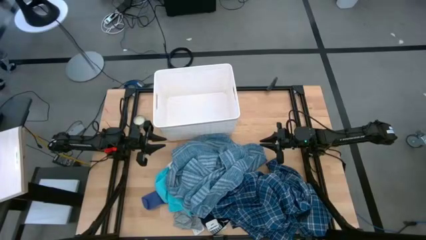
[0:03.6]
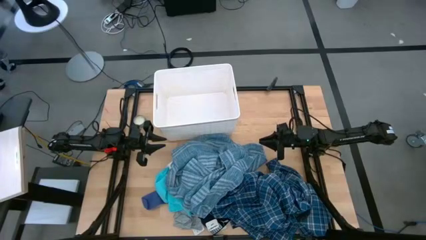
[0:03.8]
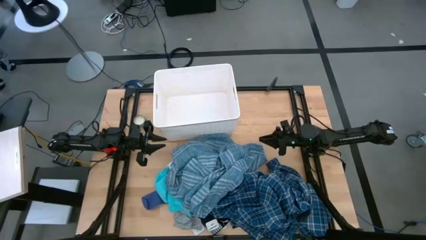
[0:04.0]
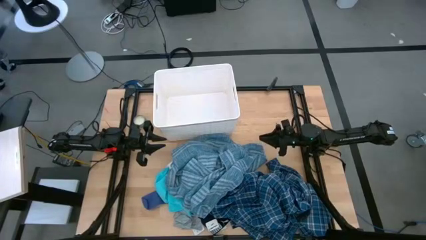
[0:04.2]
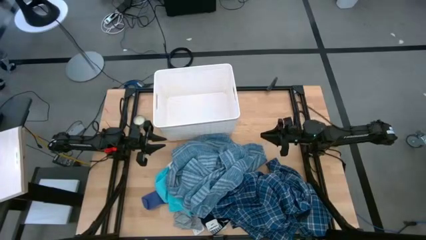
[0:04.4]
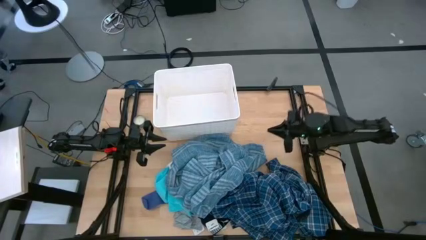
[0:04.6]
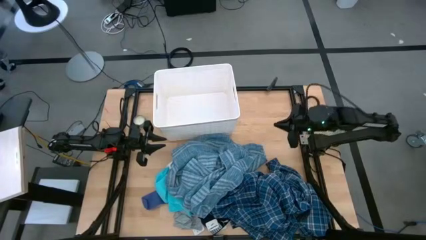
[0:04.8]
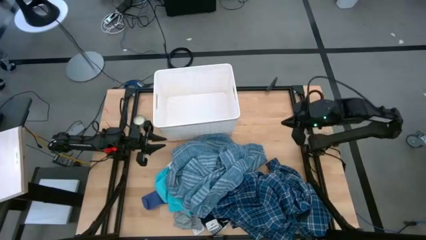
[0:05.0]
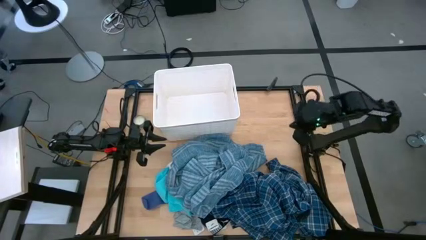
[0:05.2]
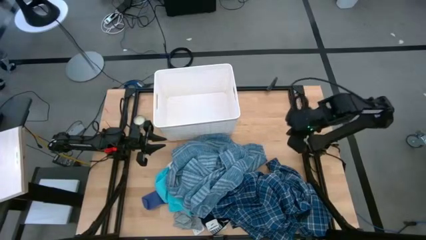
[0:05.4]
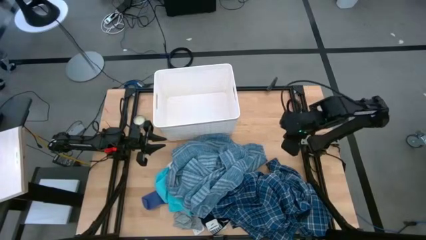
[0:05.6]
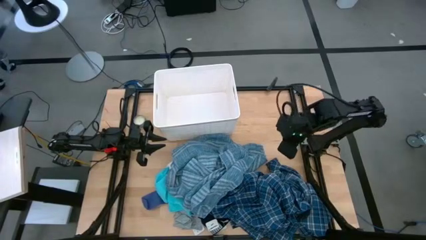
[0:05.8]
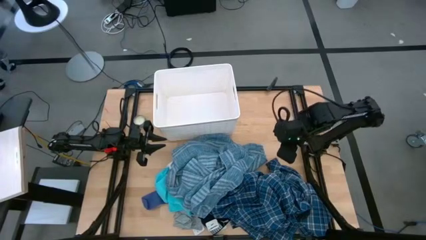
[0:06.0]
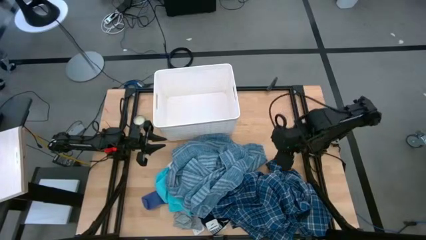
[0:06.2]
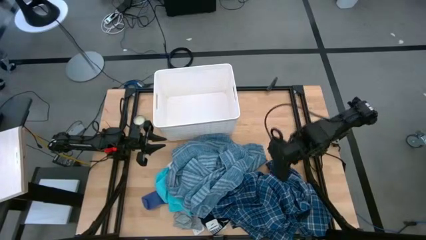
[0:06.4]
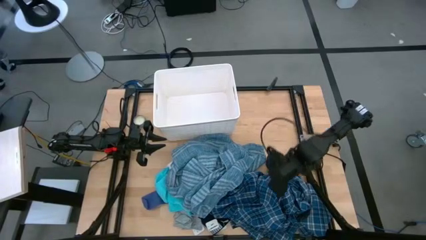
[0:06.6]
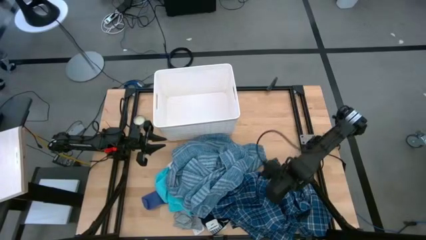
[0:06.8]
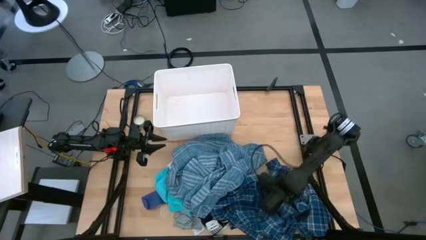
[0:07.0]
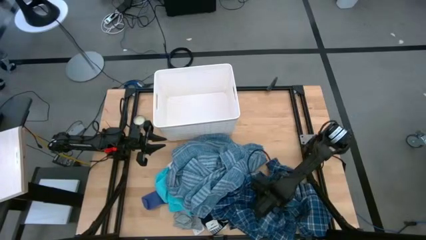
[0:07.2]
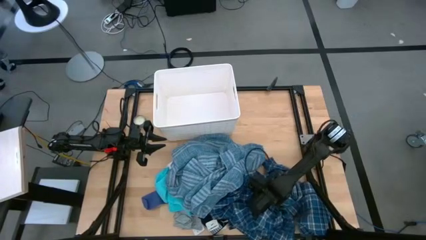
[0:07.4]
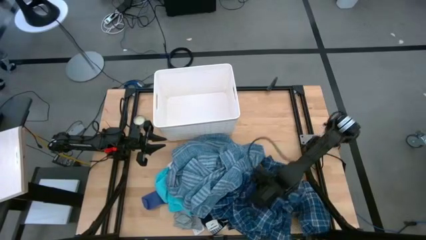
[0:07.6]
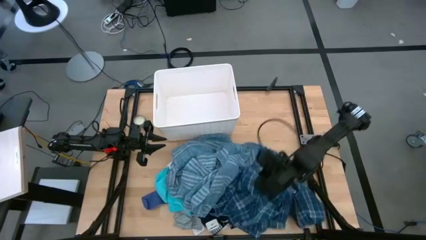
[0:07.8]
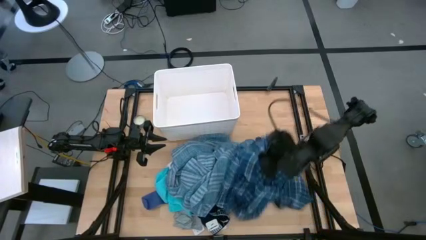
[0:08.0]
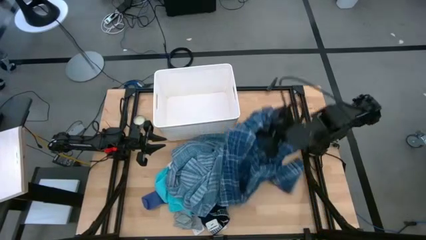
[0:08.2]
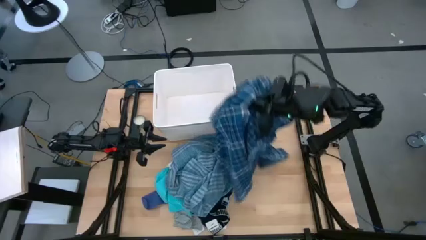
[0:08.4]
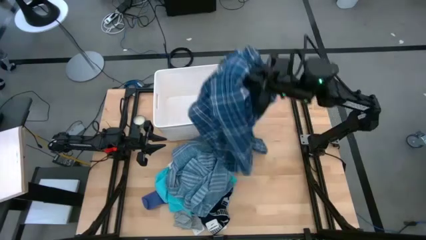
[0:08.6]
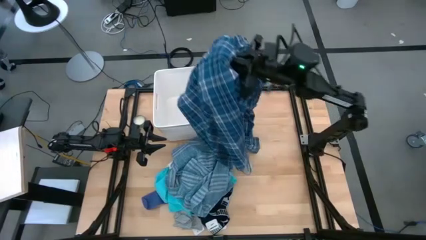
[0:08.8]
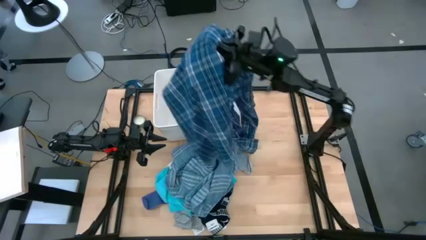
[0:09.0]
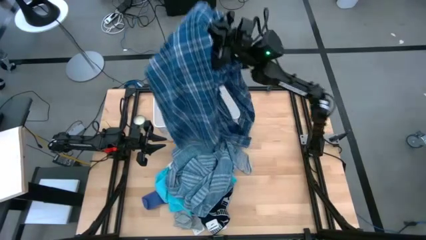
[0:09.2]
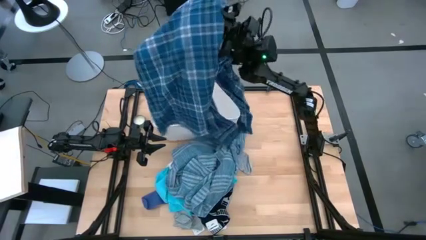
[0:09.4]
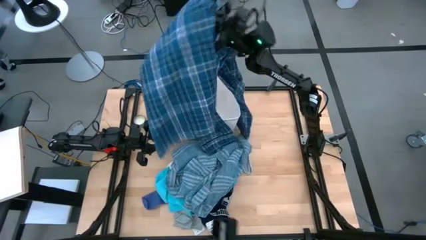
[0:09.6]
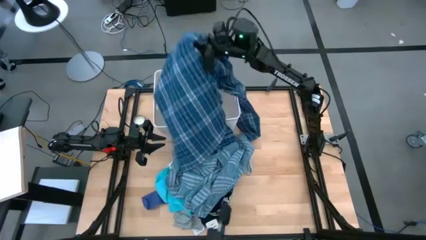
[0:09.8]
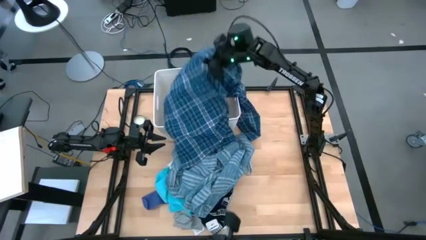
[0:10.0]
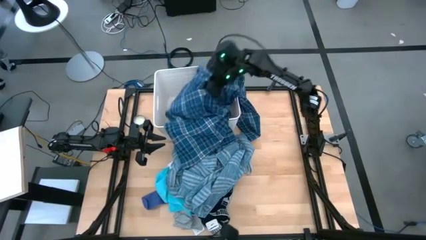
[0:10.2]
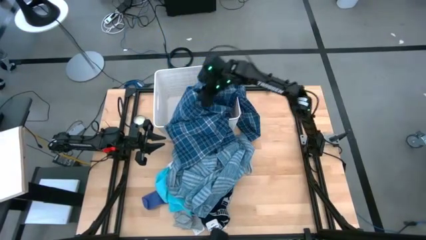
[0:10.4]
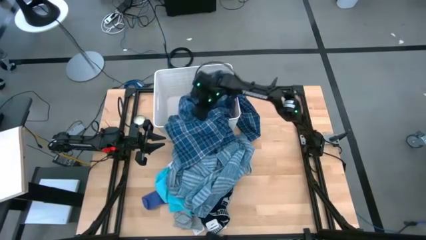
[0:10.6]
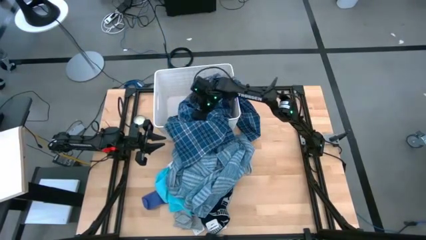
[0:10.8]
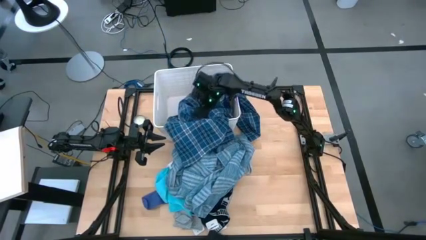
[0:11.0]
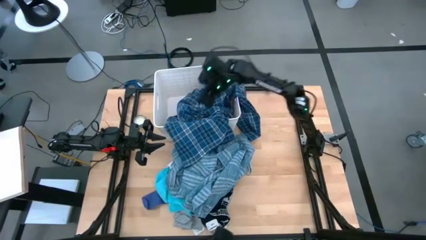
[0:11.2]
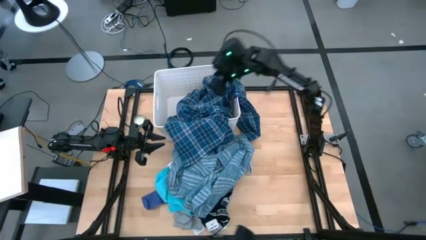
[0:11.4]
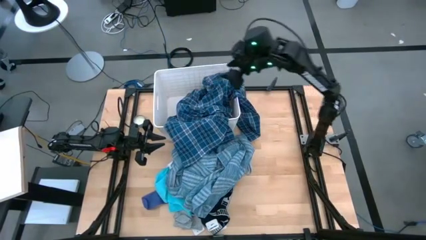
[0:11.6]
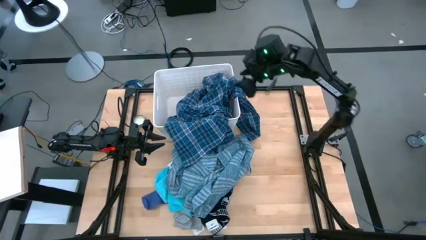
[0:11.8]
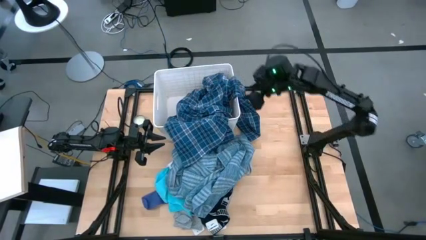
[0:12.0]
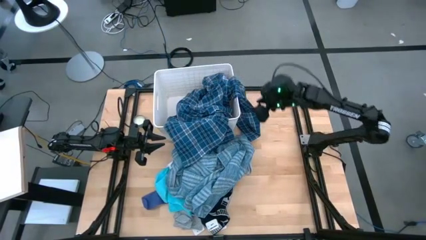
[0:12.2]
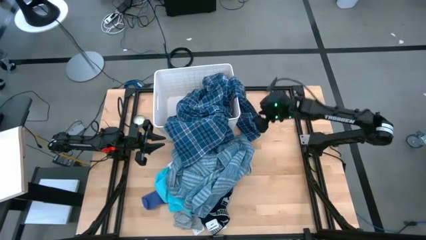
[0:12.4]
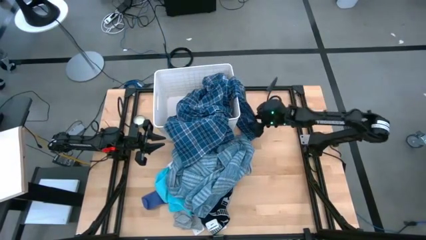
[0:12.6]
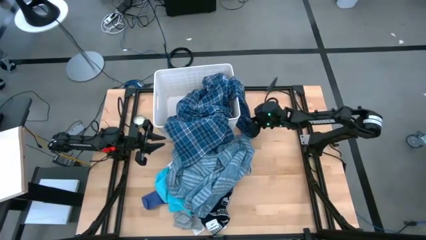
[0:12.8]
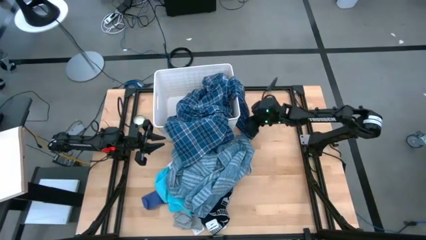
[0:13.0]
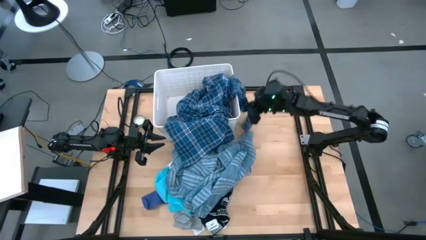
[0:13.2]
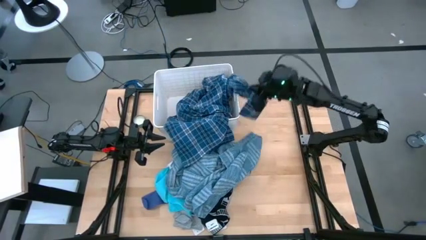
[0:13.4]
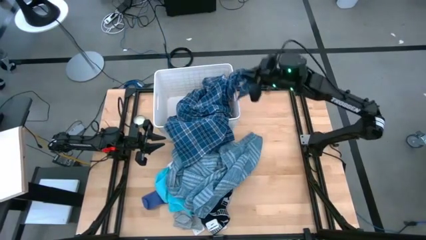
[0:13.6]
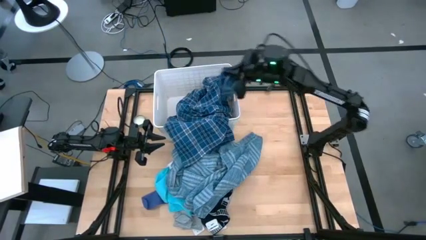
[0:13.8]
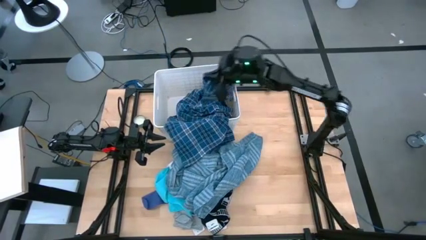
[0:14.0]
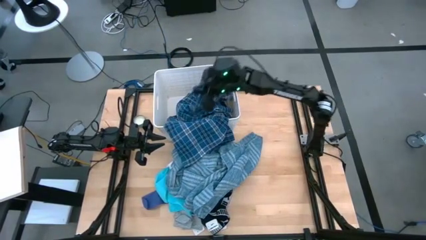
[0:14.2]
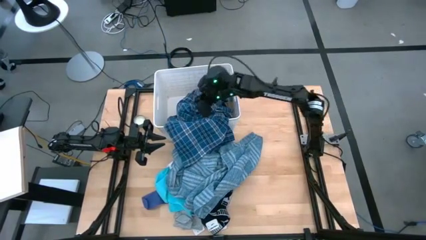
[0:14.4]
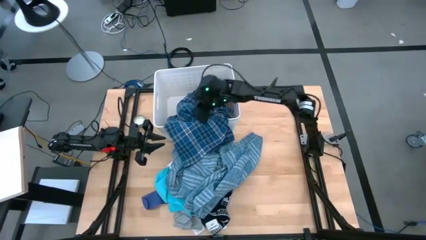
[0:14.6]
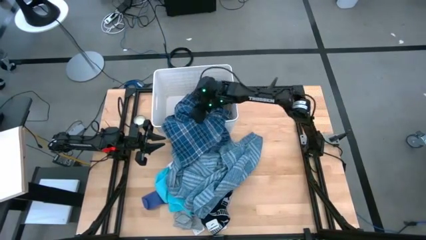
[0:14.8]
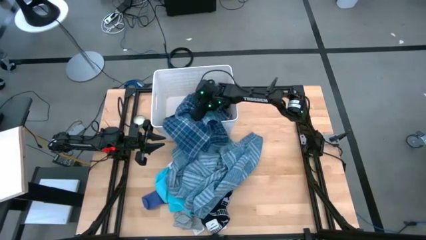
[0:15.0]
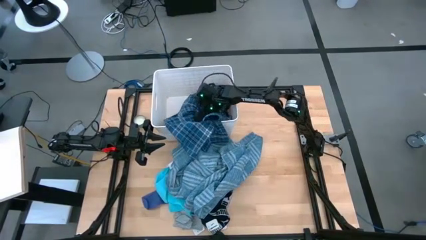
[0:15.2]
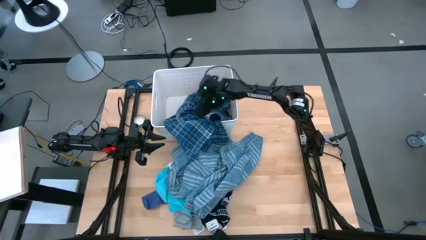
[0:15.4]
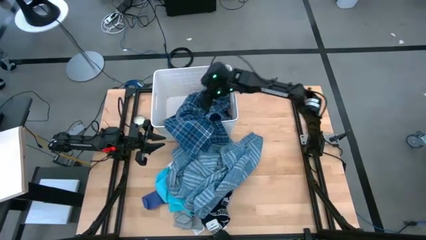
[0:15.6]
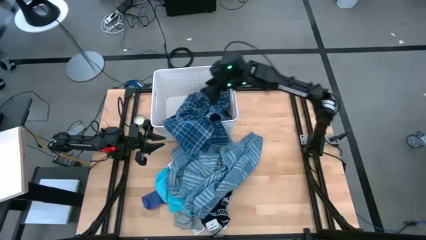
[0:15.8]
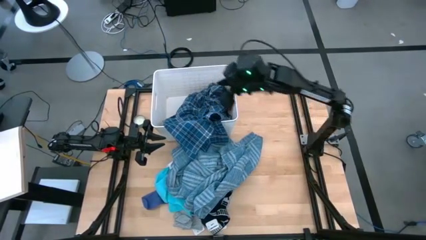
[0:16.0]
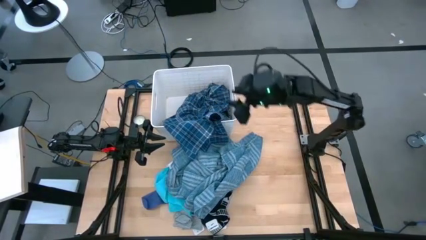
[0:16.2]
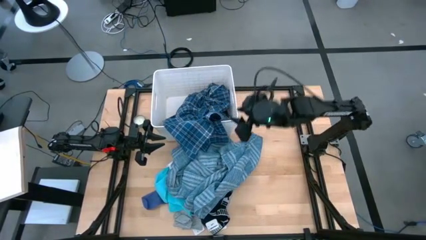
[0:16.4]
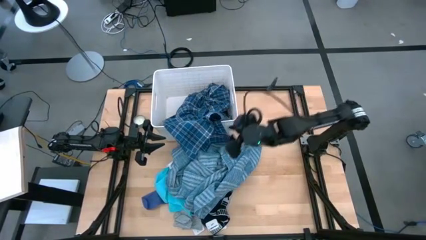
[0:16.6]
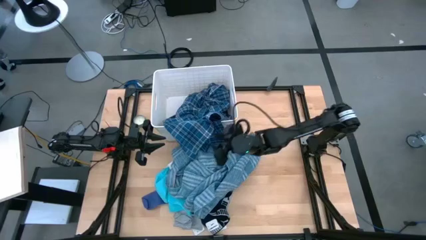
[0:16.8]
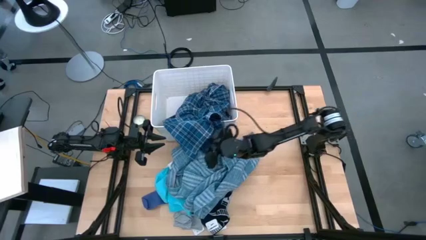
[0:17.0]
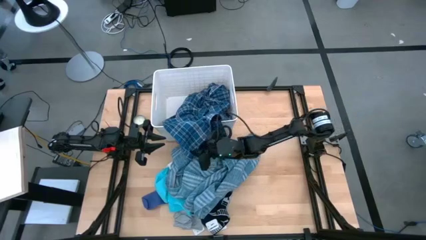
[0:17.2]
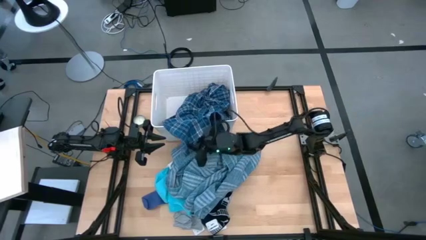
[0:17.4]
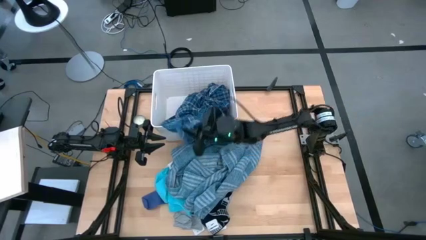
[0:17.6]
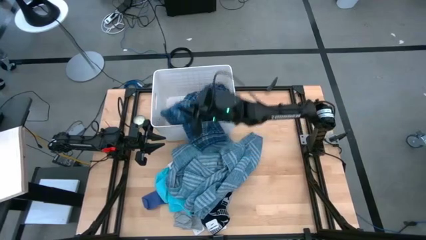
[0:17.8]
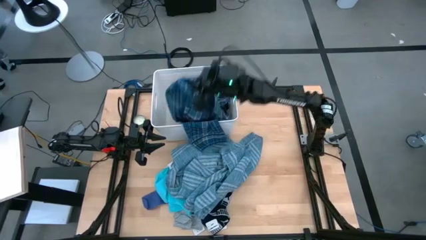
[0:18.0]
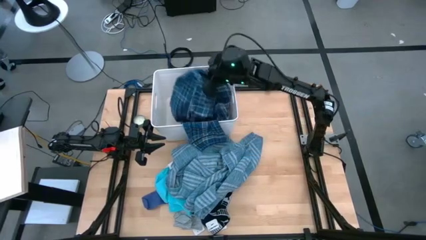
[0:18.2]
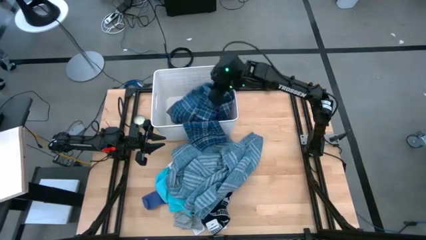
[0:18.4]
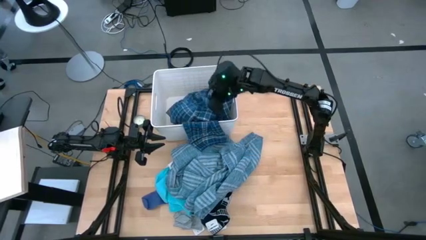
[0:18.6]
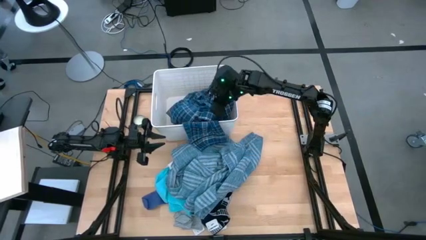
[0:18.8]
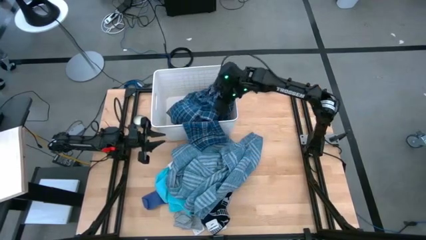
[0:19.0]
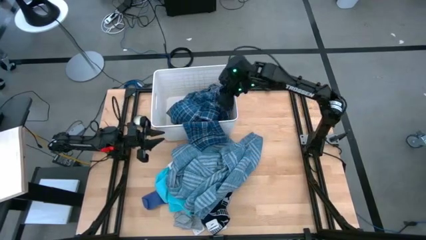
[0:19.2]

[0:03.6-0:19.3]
Task: Sort clothes
Put the checkered dark blue long sleeve shirt into the bin
